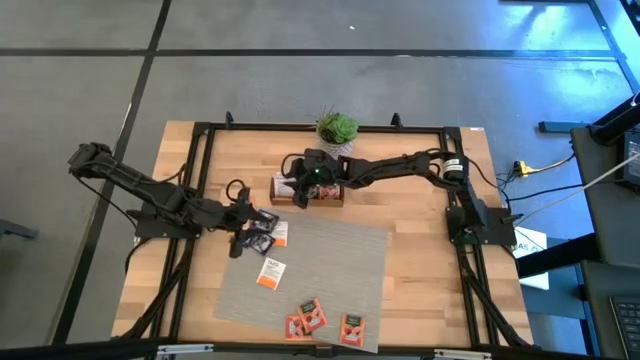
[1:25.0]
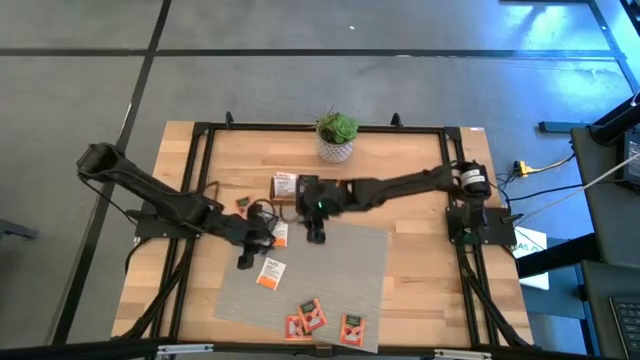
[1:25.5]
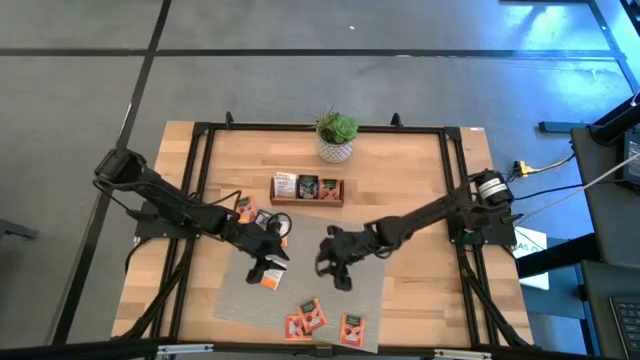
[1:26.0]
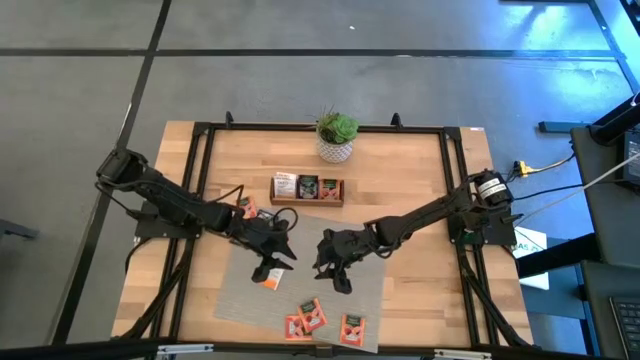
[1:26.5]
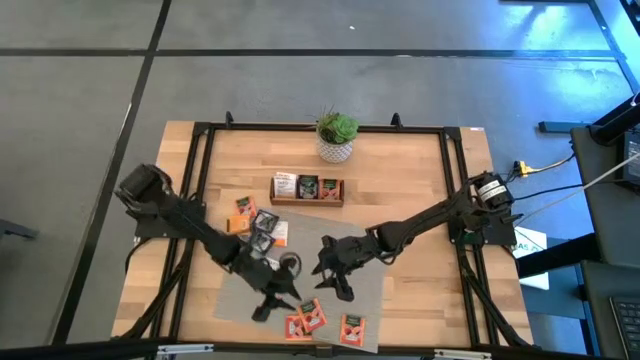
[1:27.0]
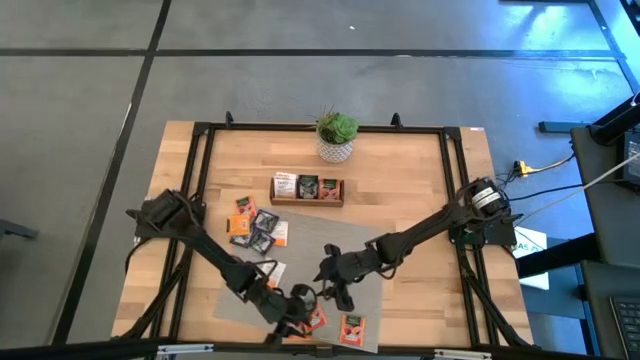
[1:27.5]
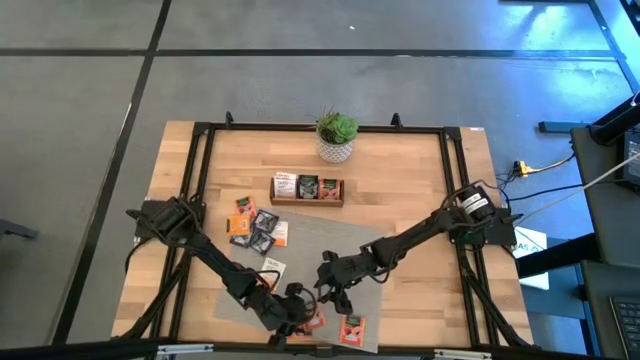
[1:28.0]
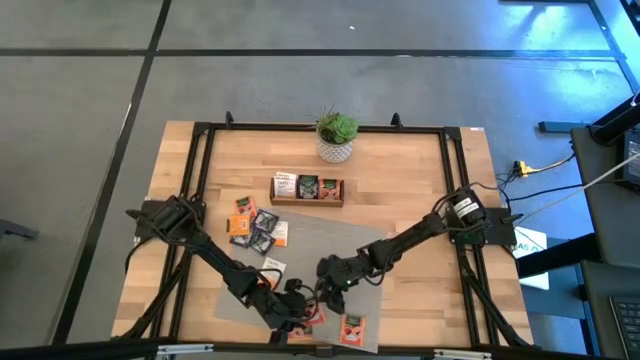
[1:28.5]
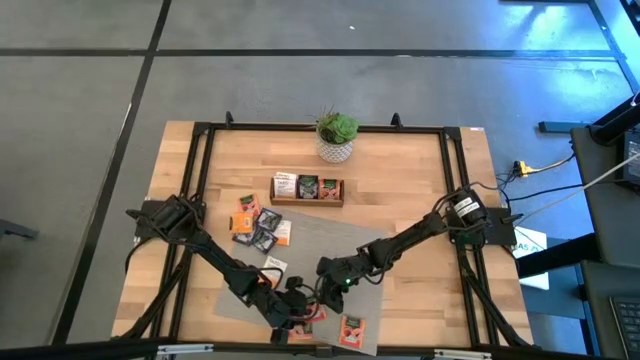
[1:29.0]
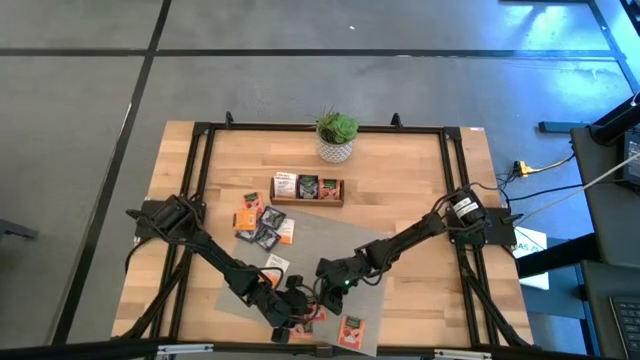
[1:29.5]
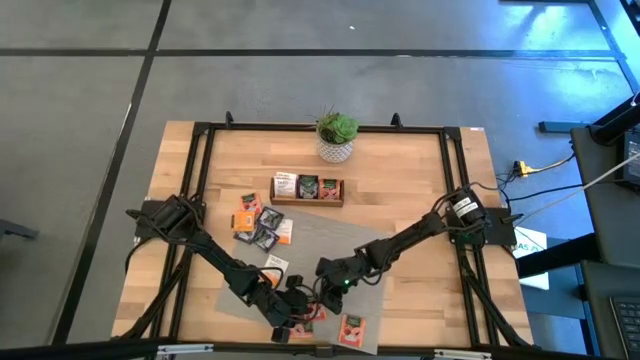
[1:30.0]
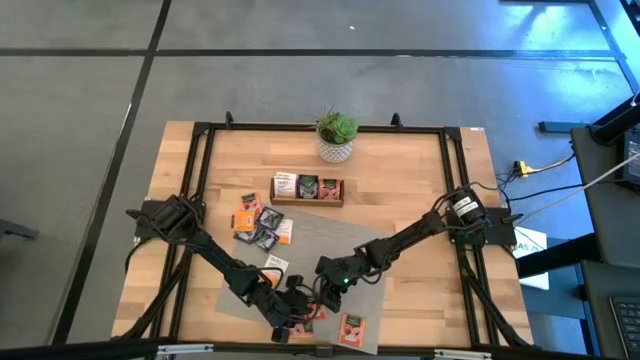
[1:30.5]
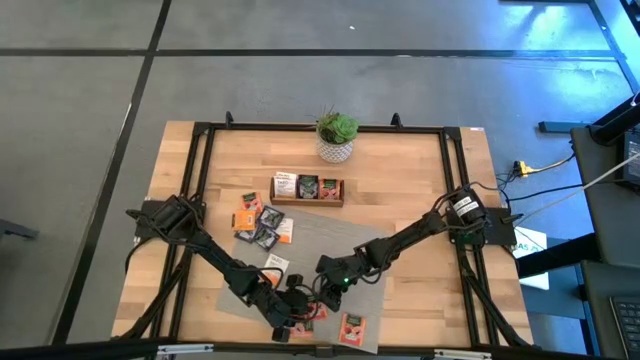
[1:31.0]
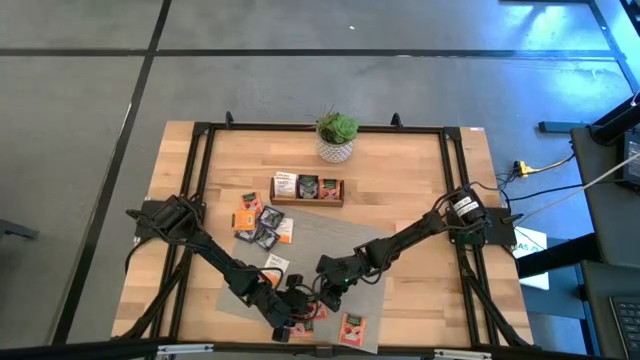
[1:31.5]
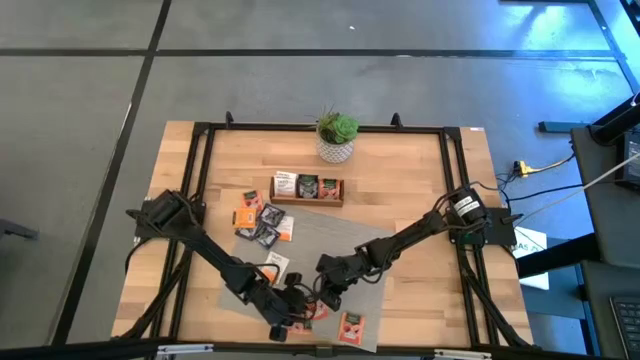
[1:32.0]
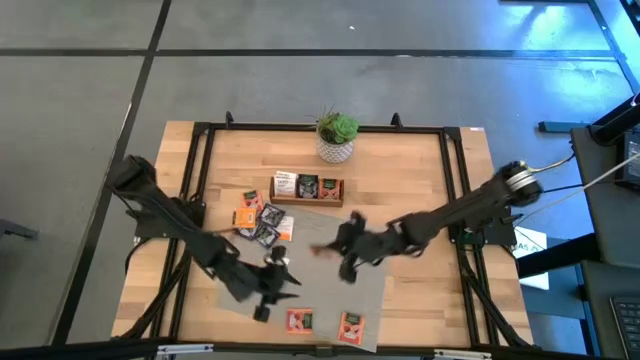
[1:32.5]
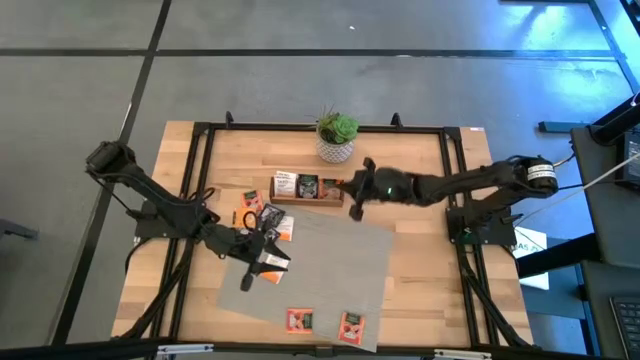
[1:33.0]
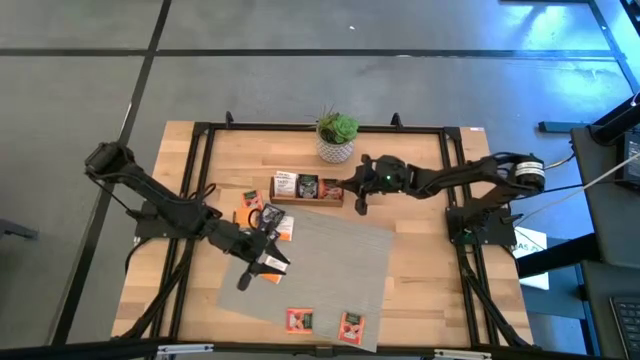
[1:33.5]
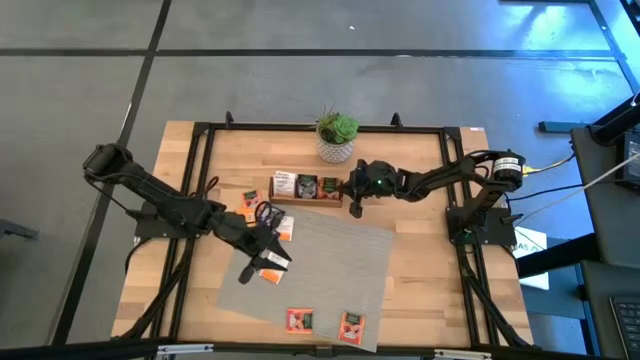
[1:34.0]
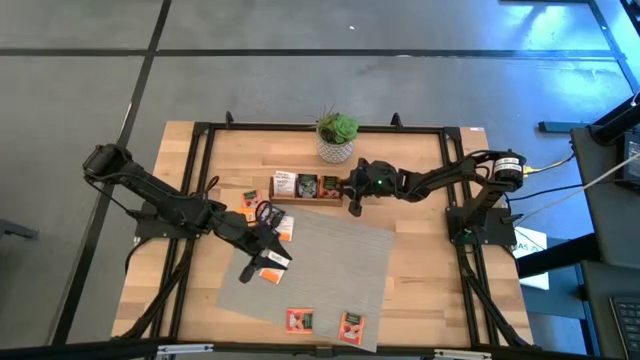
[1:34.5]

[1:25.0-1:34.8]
Task: Pick & Place Tea
Put the orange tea bag into the right section of the wooden organizer

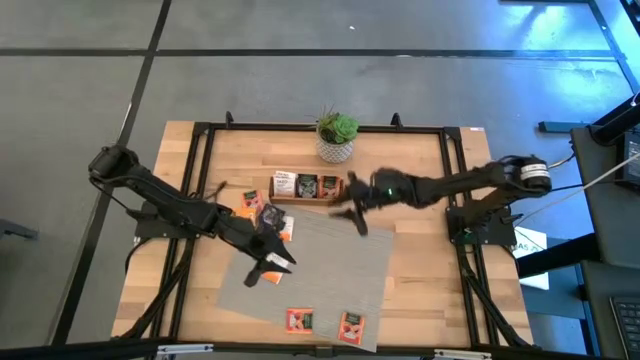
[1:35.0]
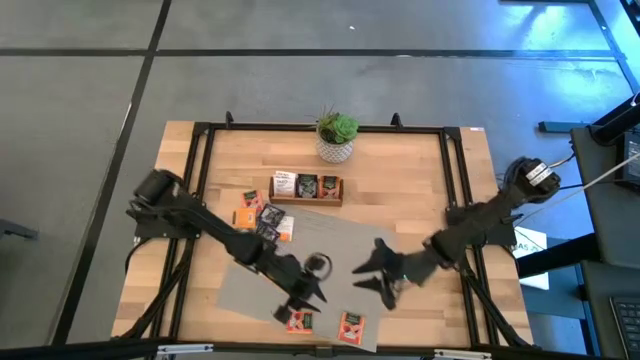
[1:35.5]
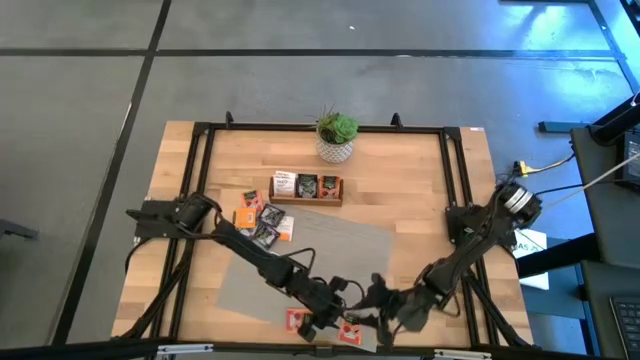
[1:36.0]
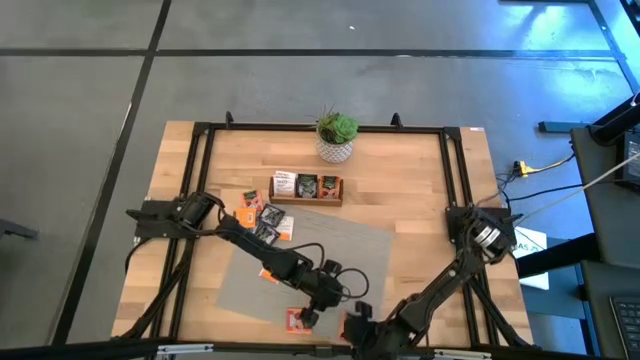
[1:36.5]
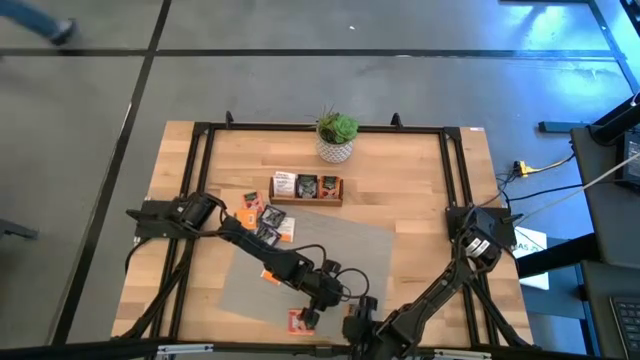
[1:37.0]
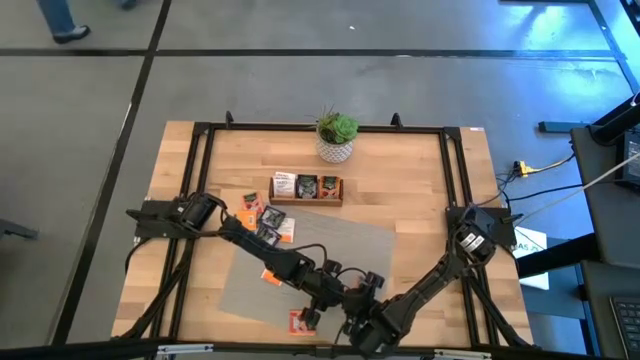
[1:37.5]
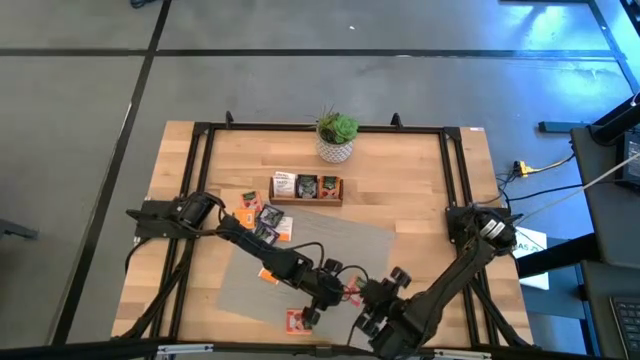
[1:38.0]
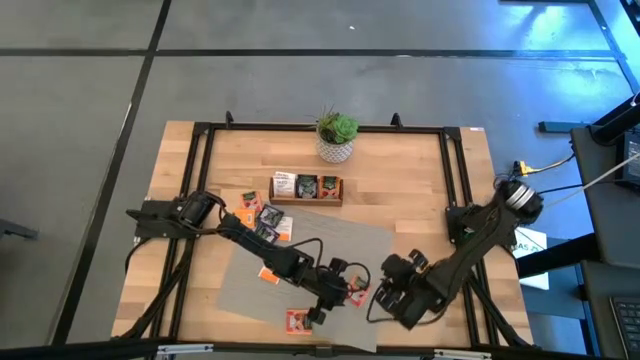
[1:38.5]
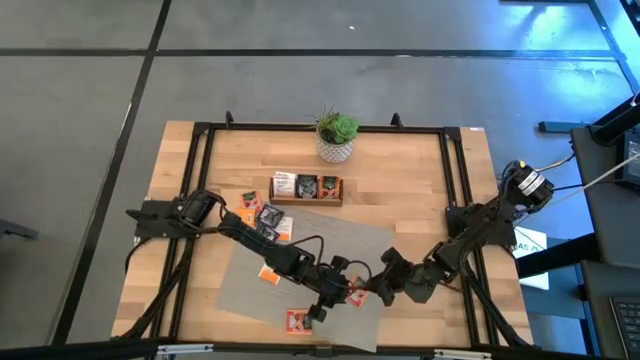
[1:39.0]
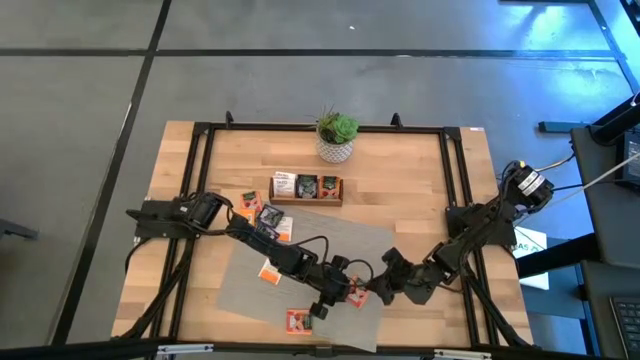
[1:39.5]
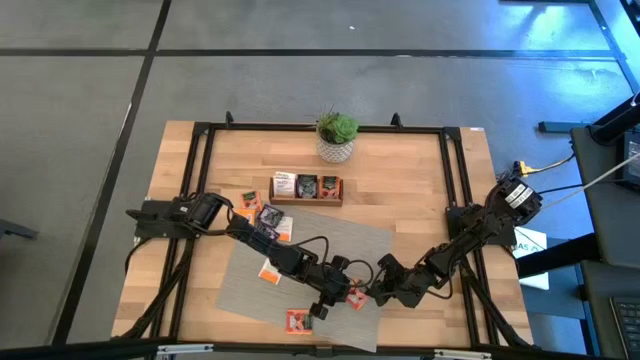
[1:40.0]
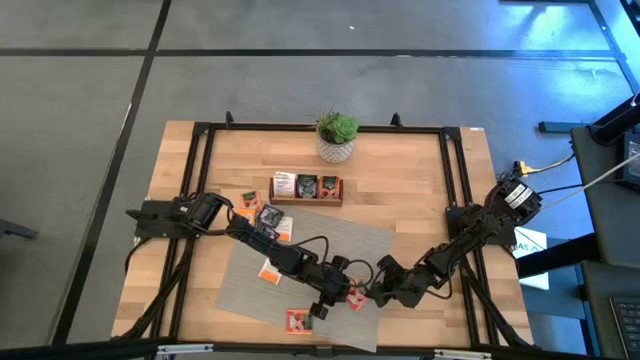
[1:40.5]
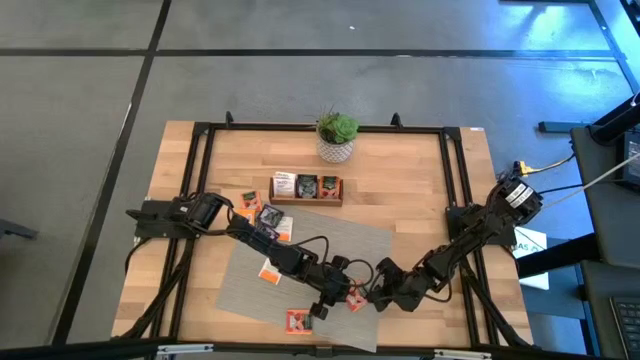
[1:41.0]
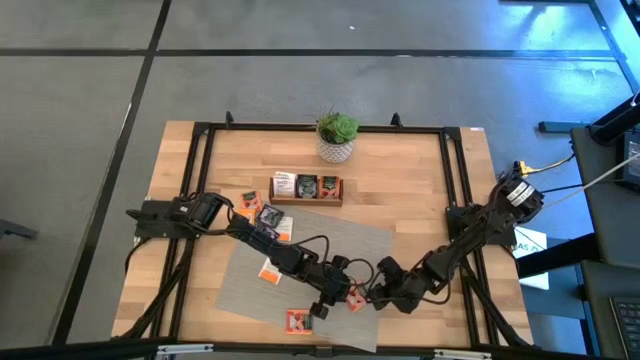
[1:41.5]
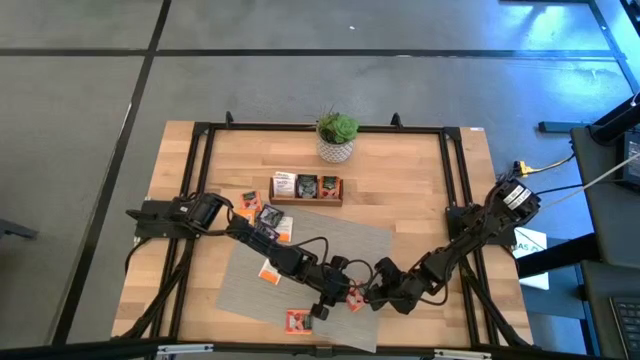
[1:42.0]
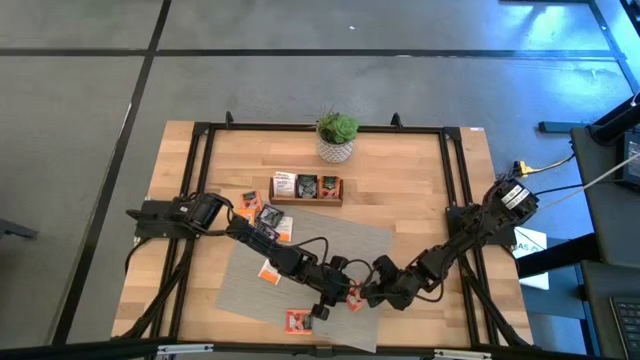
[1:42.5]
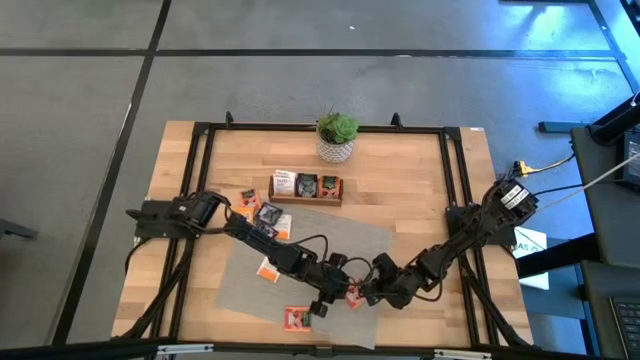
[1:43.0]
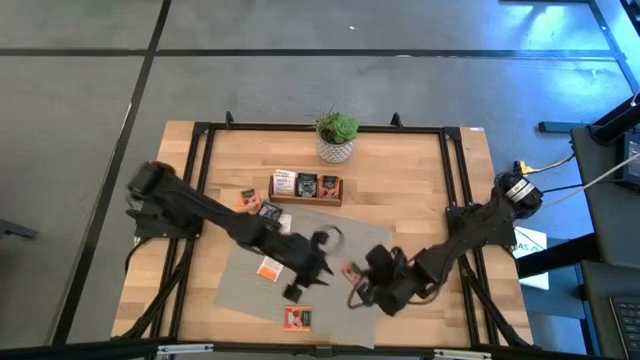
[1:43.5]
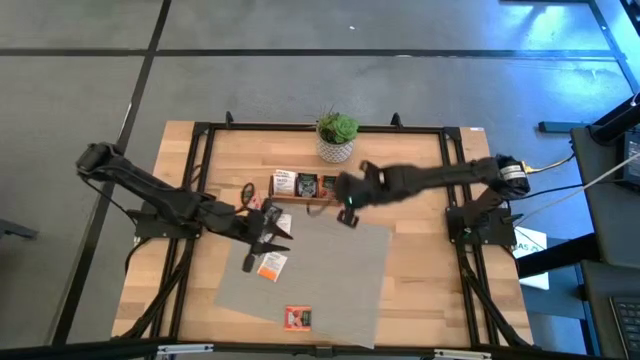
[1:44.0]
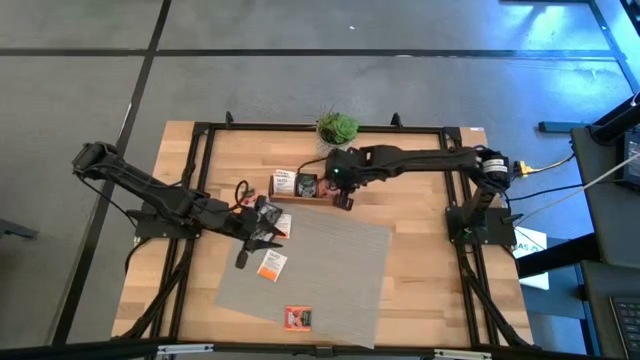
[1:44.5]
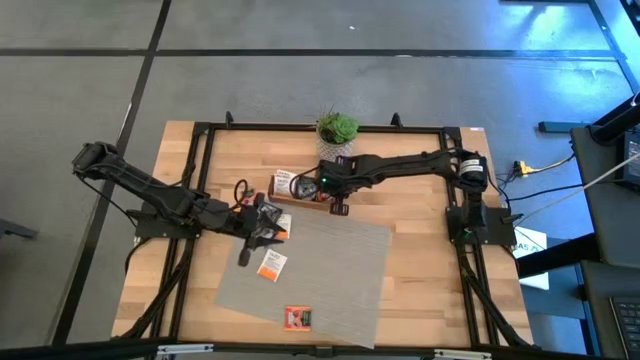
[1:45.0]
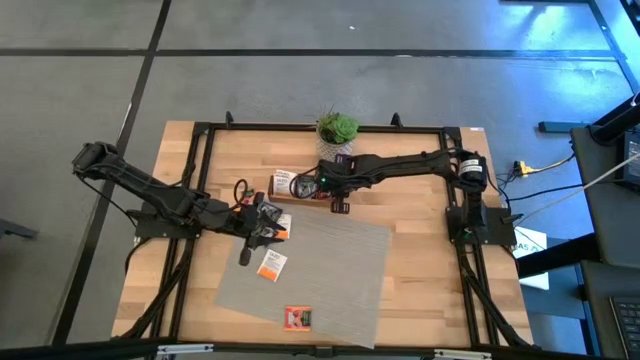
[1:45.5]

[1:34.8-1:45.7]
Put the orange tea bag into the right section of the wooden organizer
